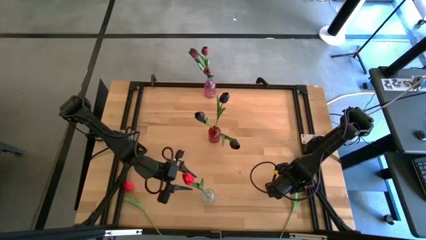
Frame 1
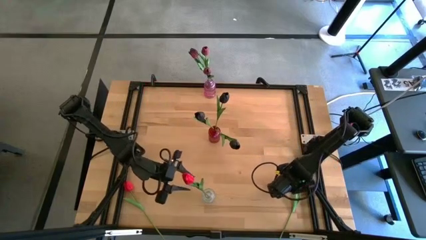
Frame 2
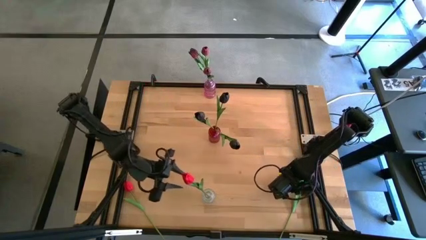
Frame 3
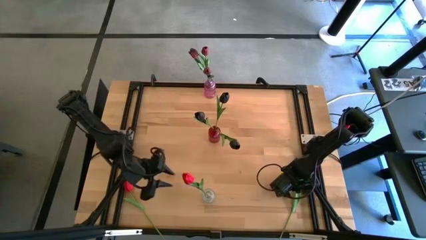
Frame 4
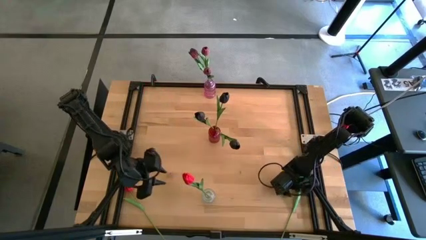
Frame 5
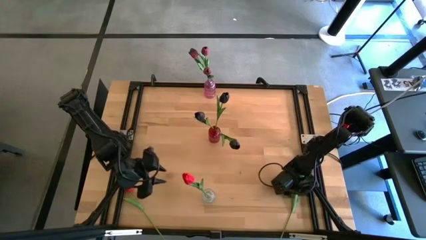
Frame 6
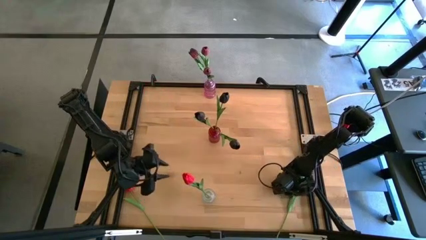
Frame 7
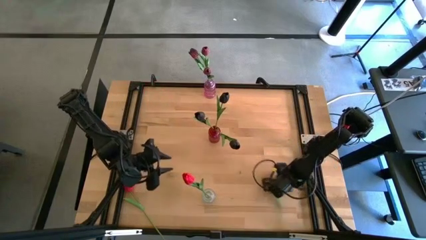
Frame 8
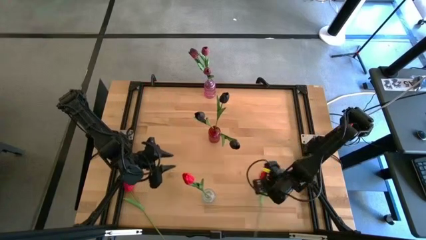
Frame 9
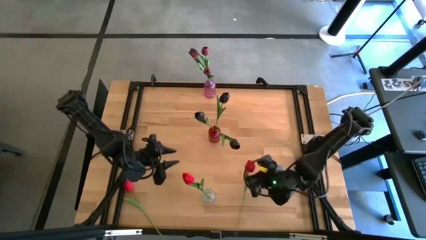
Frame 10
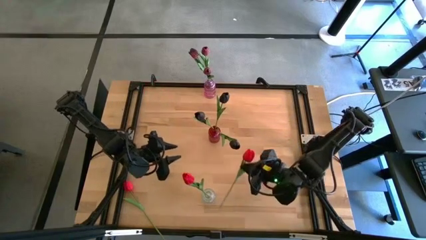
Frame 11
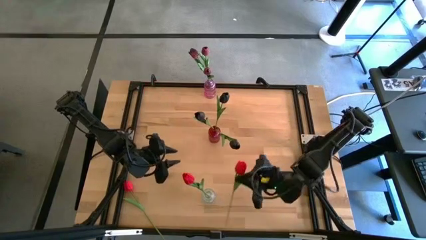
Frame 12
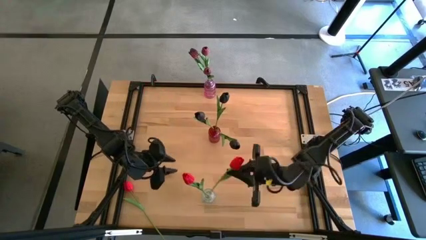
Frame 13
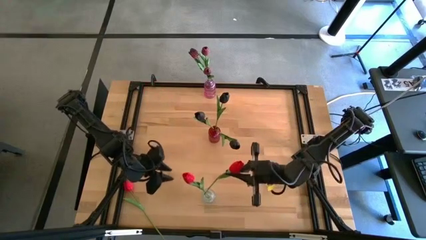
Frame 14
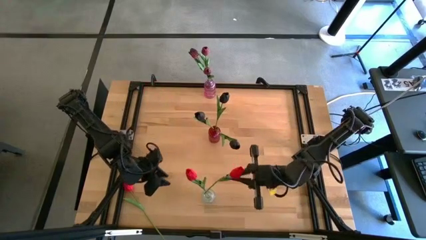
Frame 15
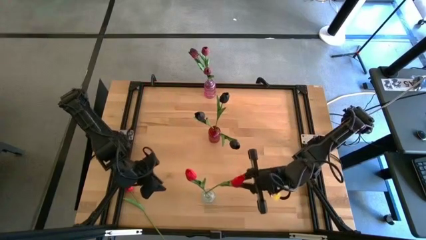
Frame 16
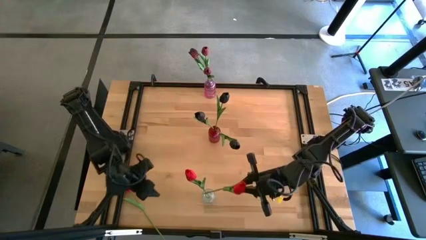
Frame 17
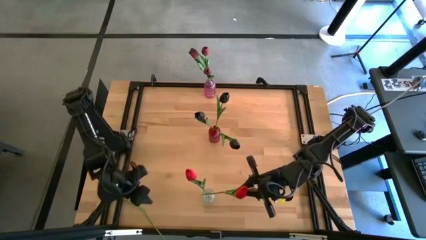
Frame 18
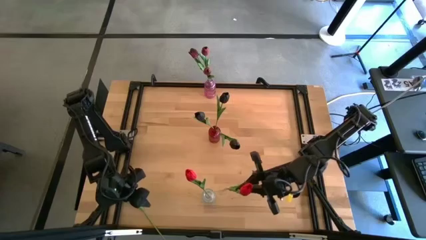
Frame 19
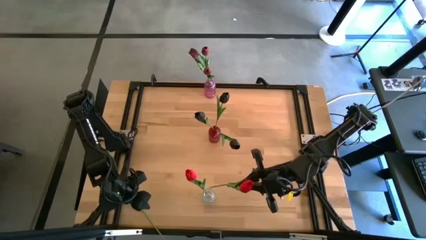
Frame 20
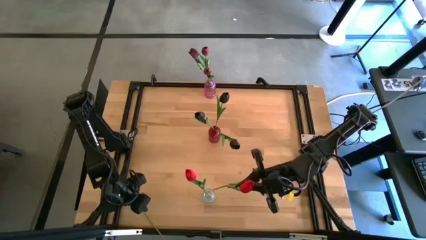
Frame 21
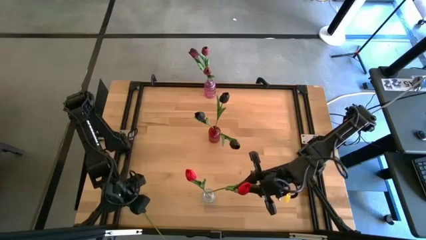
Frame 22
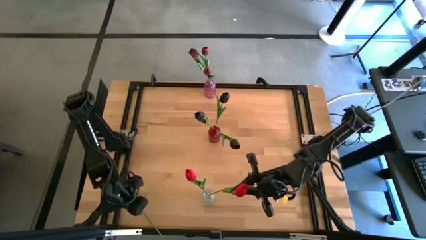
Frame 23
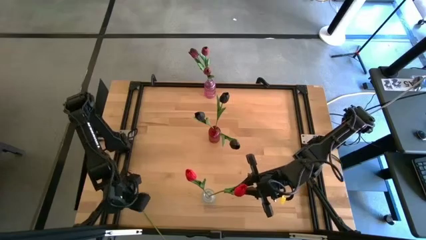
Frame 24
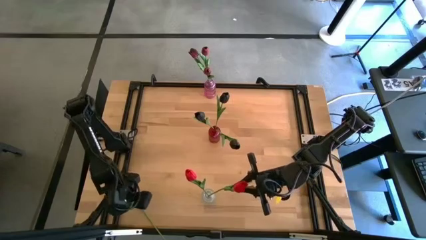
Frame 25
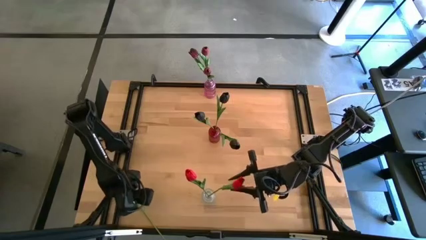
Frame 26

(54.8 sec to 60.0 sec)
Task: Sort flowers into vase by color
Put the right red tulip into the transparent vase

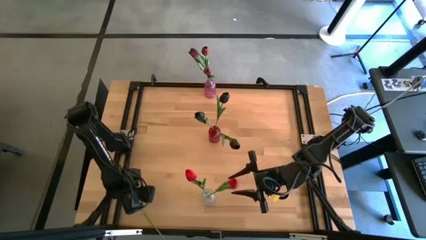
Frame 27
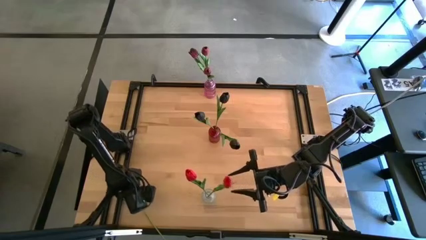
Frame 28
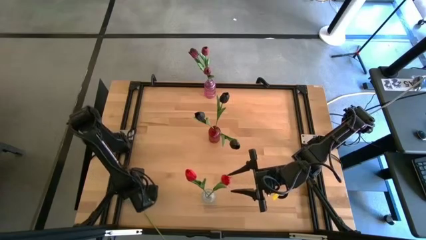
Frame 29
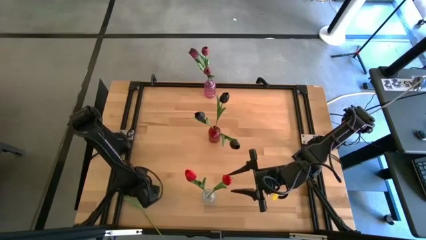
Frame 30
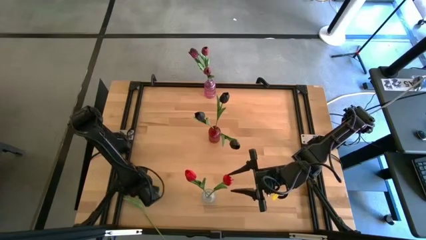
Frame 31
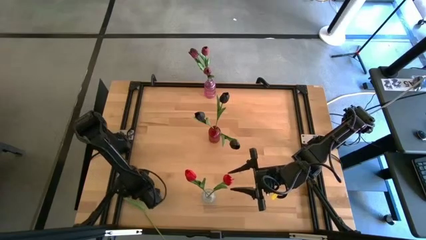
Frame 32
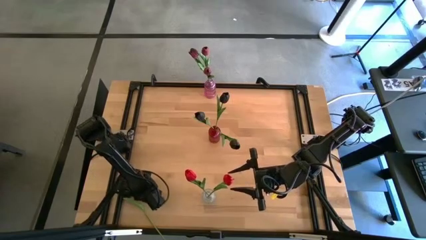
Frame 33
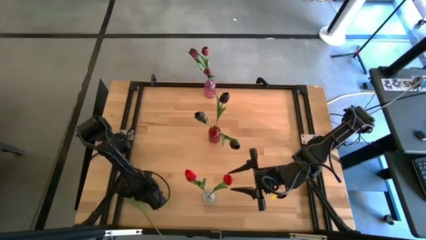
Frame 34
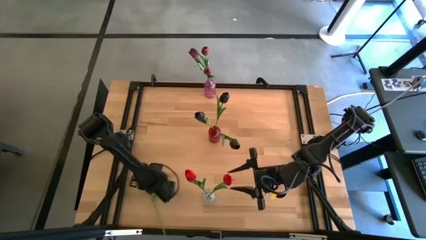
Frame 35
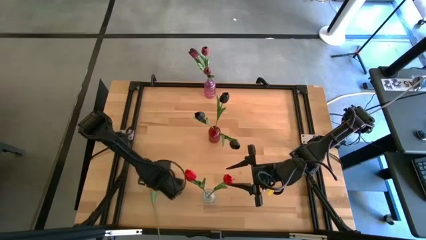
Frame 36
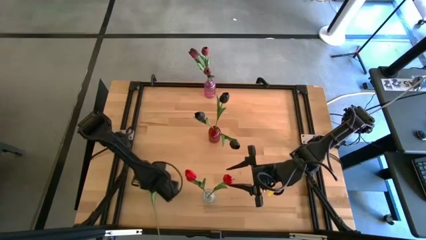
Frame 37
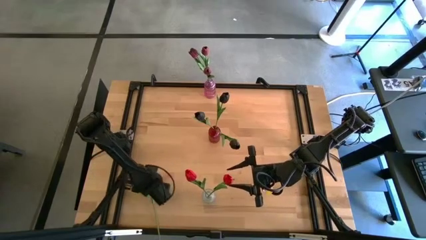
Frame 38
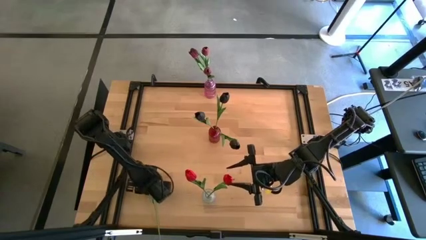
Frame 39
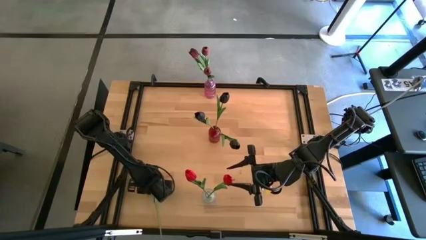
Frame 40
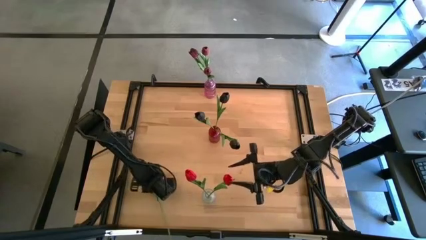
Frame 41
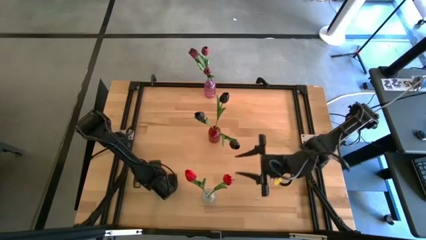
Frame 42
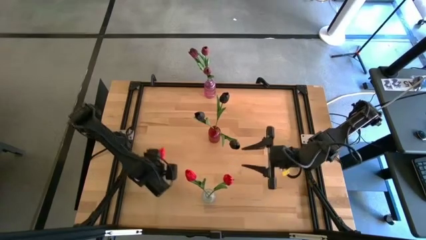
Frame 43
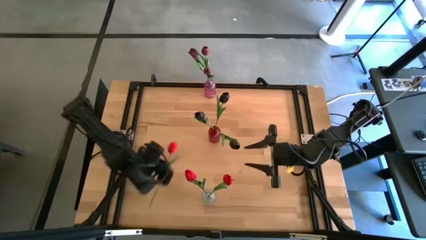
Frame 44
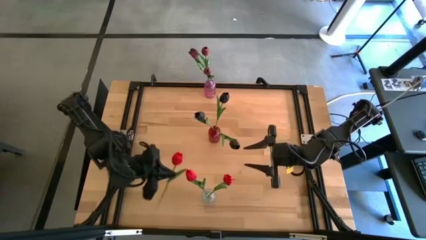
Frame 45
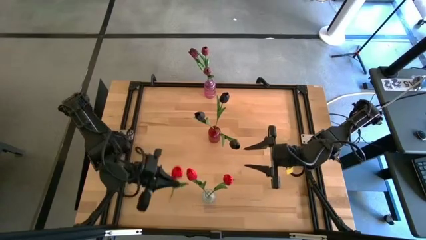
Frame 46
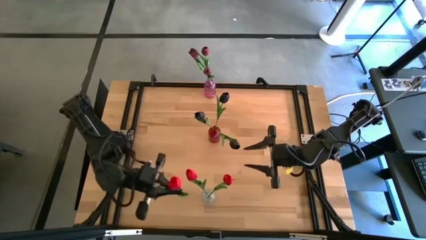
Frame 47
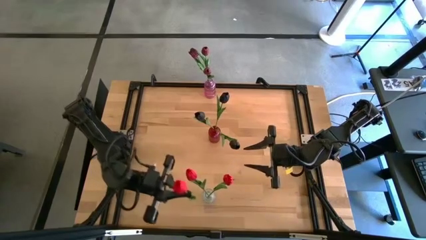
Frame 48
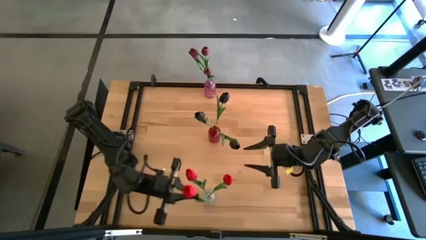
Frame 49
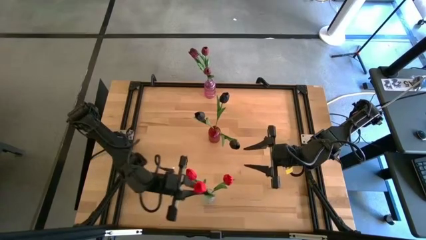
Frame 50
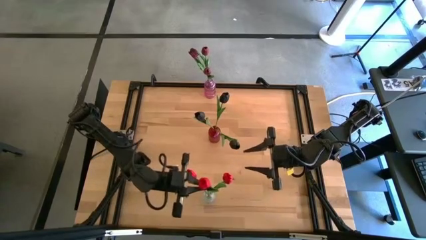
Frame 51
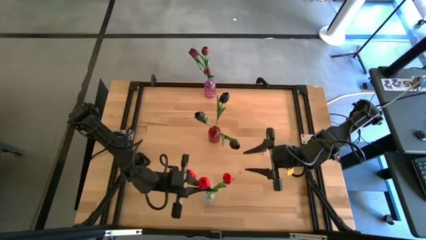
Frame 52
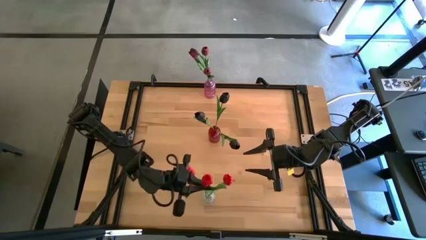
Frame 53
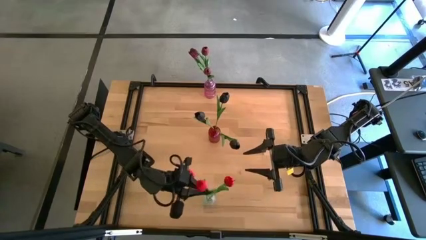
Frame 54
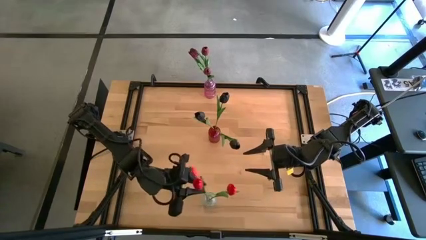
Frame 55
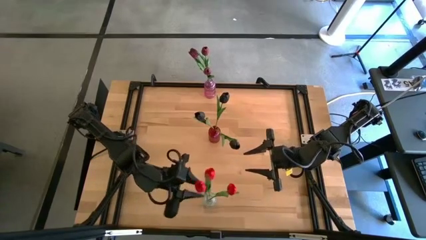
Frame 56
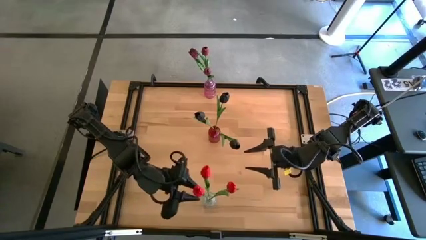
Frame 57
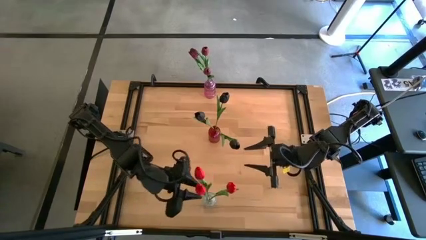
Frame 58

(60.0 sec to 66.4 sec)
Put the red tulip into the transparent vase

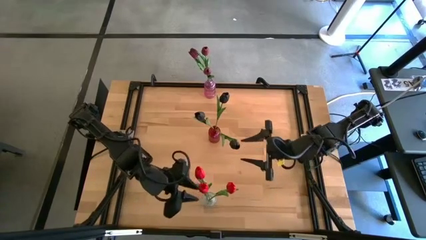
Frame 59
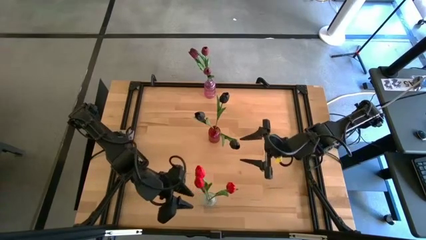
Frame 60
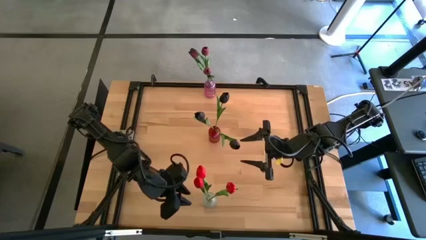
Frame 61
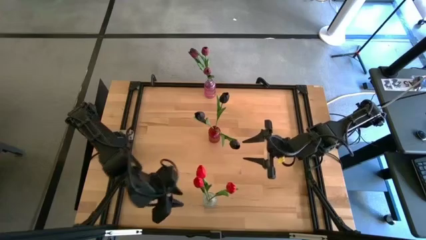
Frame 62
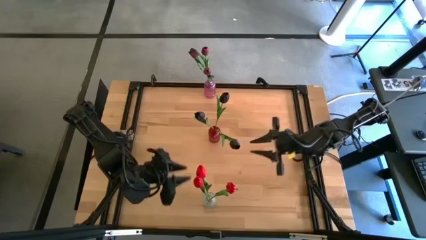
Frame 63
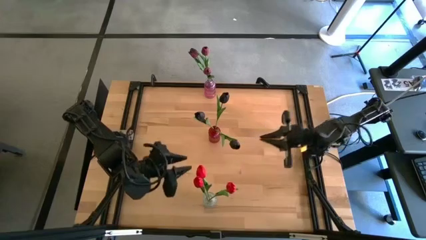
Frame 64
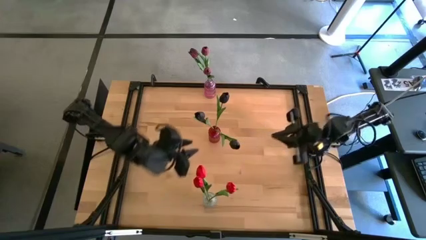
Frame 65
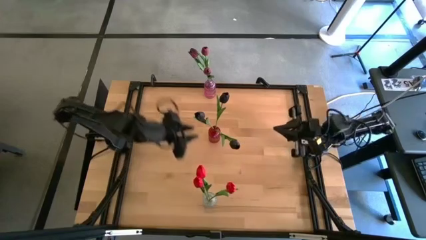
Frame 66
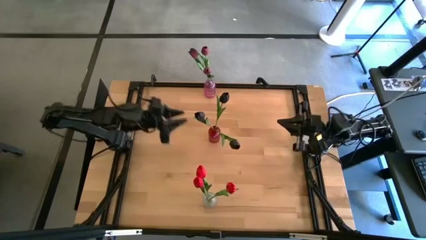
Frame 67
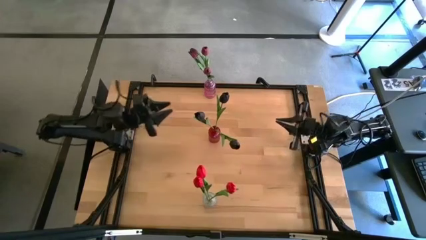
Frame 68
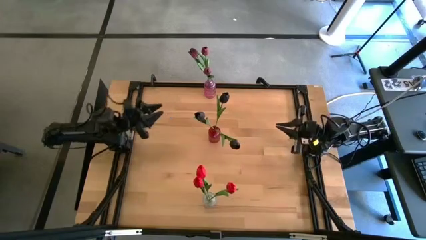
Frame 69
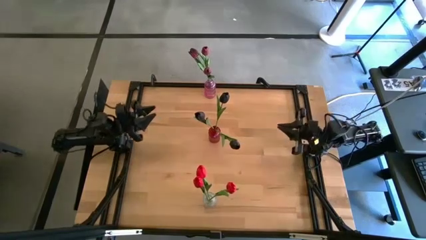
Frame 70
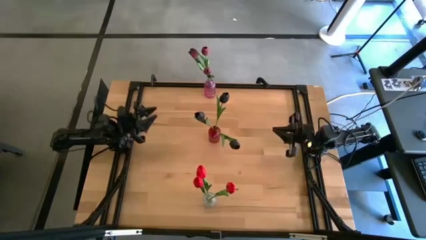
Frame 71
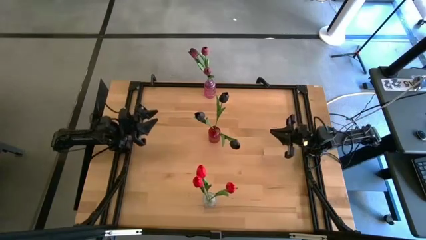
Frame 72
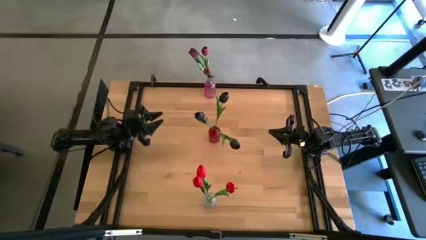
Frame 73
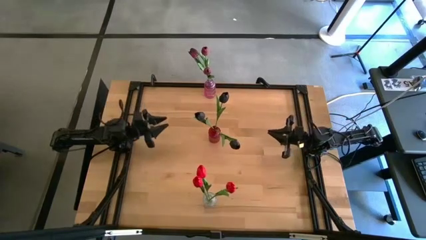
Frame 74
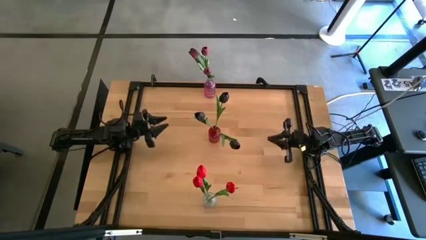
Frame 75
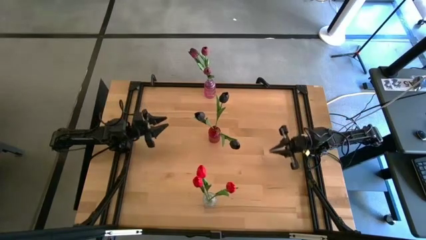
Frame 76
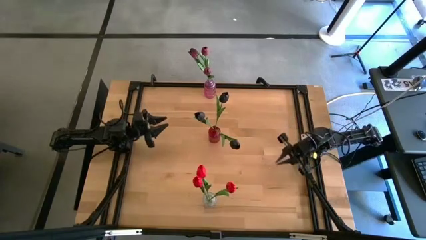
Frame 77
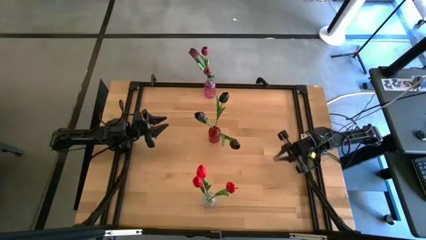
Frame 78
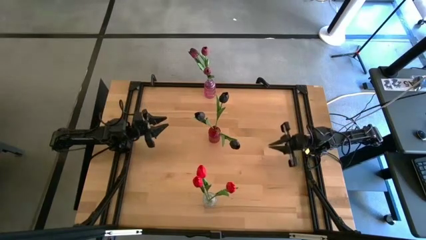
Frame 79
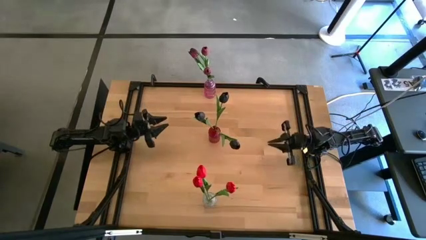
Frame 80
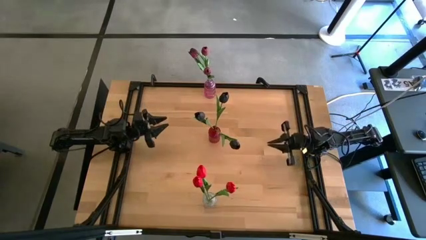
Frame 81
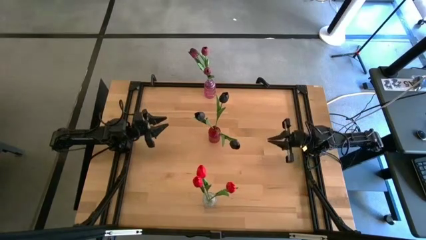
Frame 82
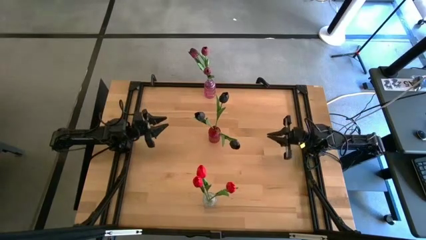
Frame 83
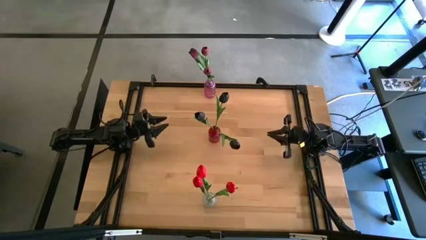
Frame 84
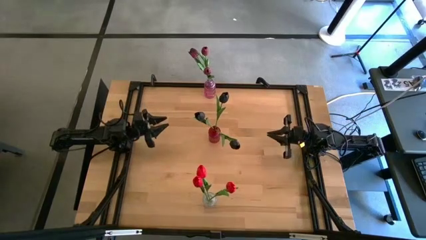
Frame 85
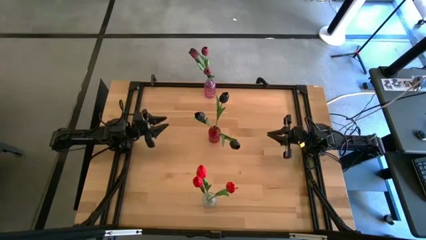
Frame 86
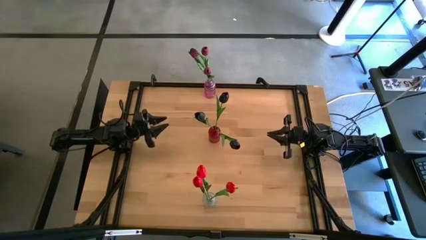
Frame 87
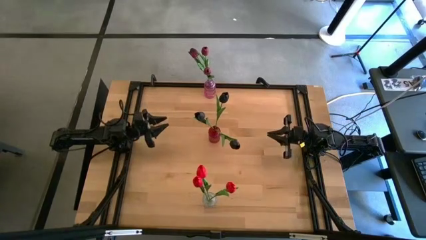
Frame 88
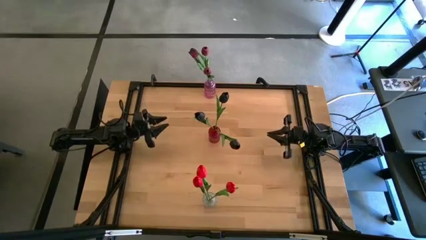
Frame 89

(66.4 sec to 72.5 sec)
Return to Home Position
